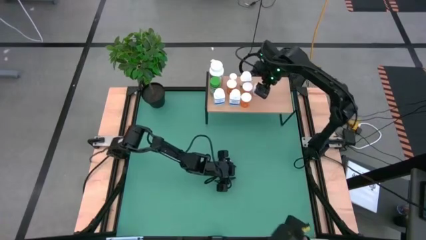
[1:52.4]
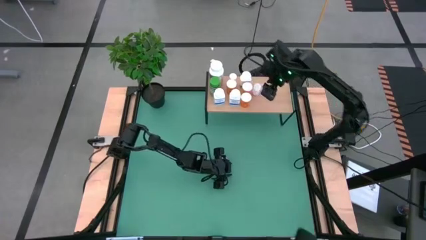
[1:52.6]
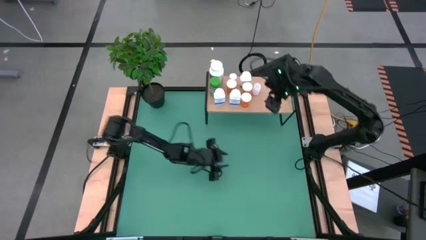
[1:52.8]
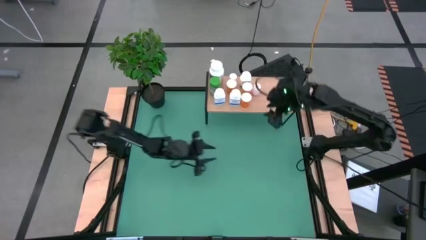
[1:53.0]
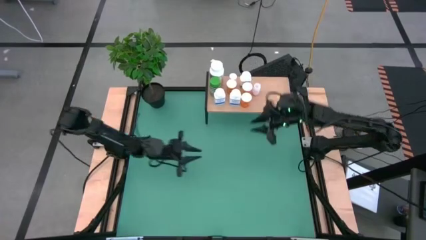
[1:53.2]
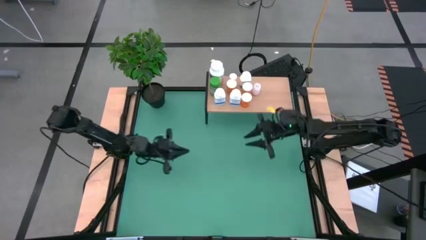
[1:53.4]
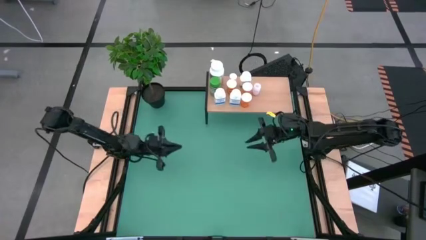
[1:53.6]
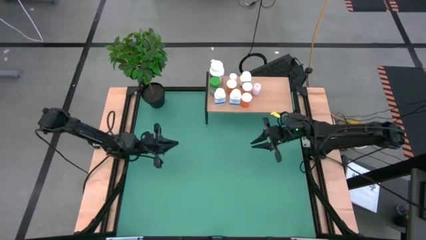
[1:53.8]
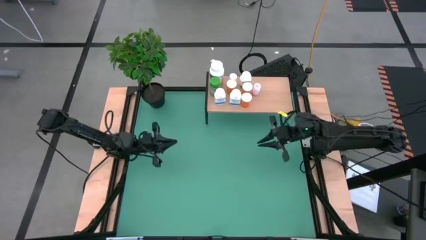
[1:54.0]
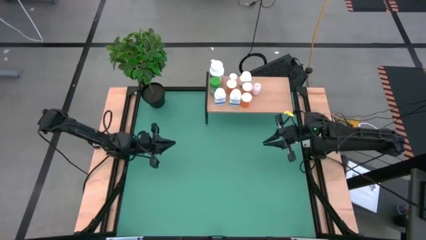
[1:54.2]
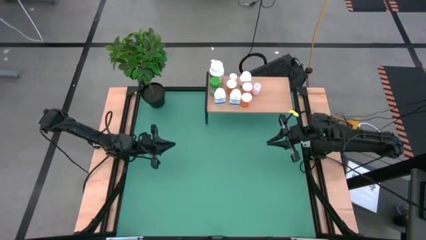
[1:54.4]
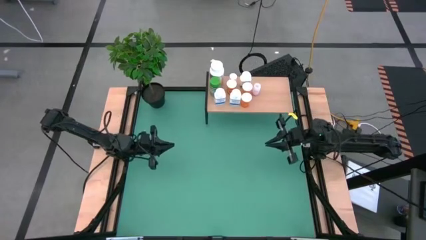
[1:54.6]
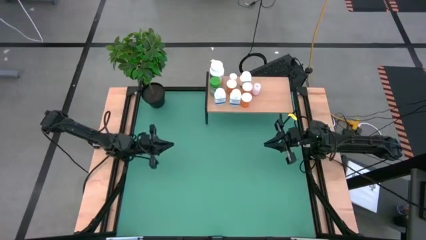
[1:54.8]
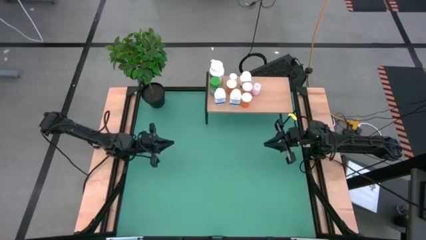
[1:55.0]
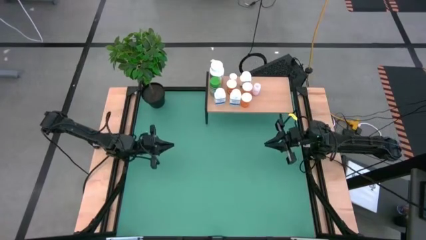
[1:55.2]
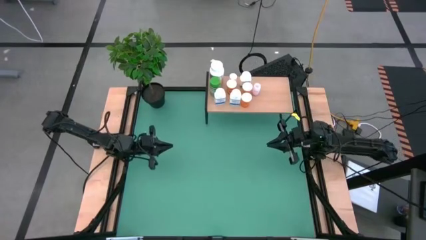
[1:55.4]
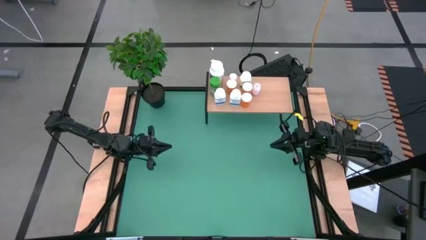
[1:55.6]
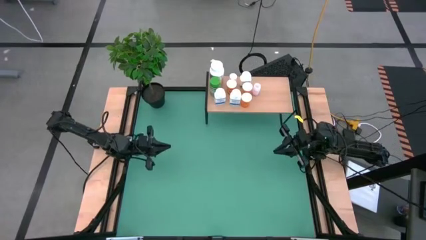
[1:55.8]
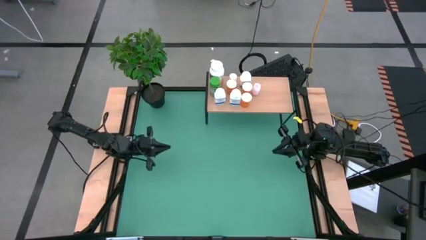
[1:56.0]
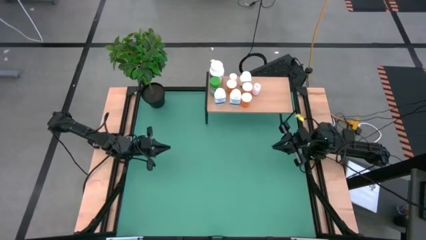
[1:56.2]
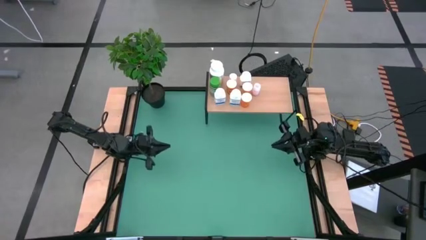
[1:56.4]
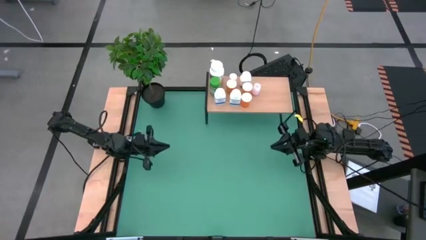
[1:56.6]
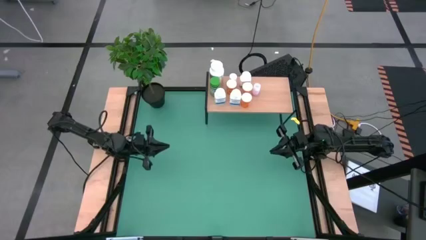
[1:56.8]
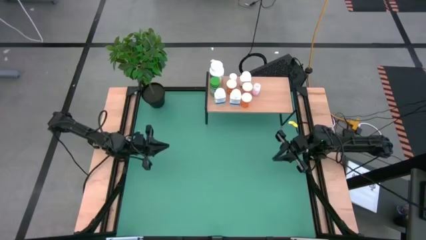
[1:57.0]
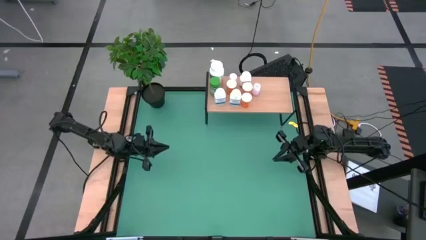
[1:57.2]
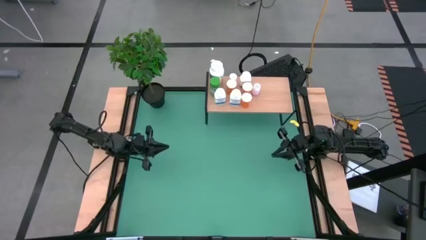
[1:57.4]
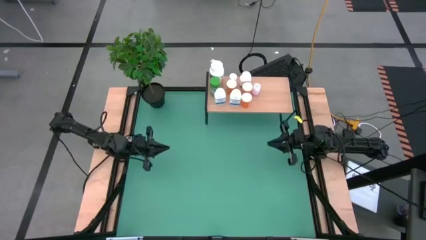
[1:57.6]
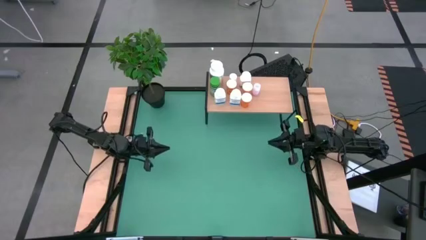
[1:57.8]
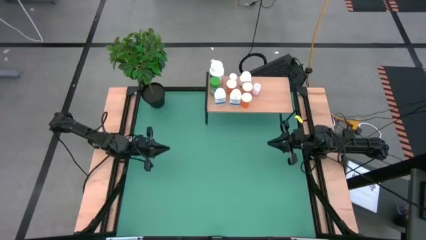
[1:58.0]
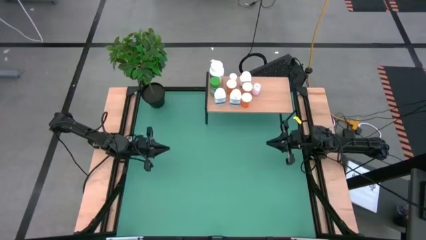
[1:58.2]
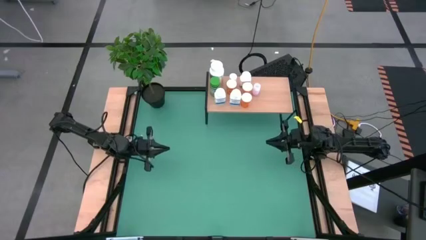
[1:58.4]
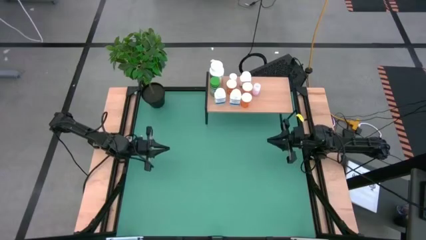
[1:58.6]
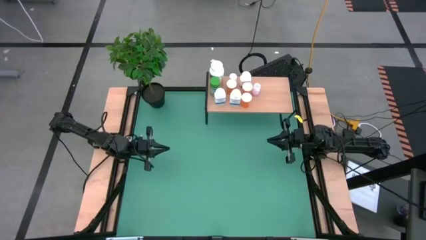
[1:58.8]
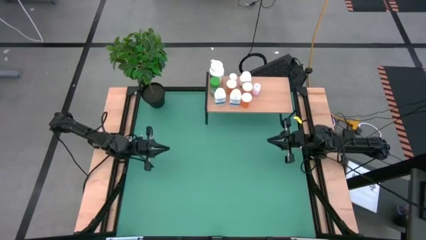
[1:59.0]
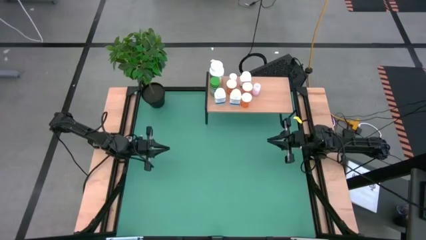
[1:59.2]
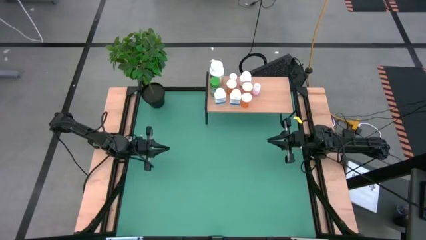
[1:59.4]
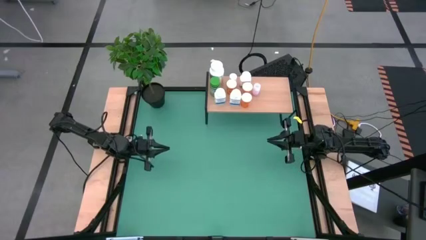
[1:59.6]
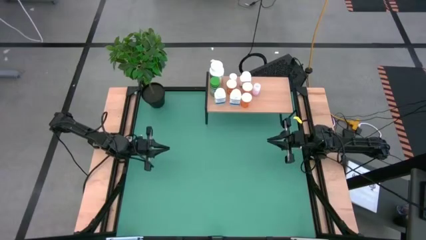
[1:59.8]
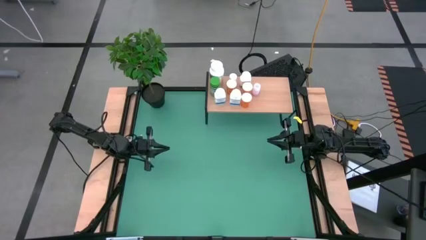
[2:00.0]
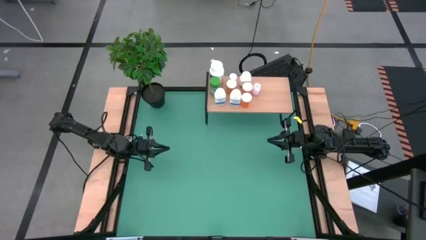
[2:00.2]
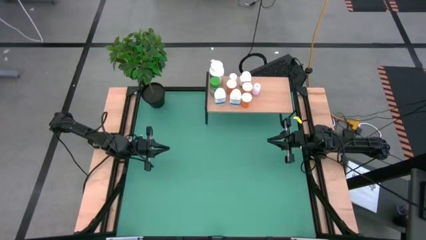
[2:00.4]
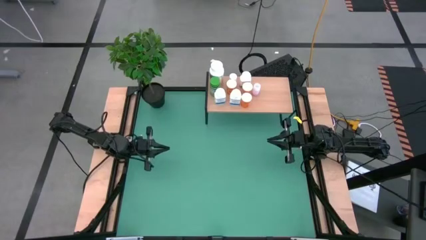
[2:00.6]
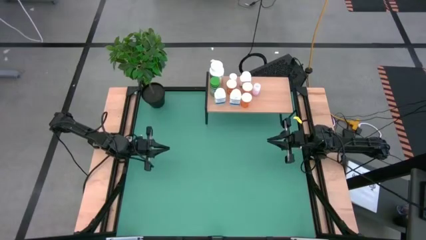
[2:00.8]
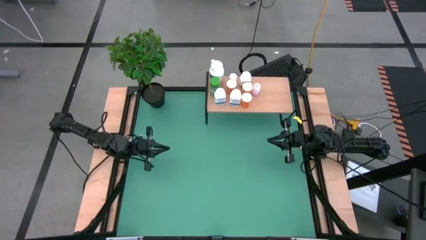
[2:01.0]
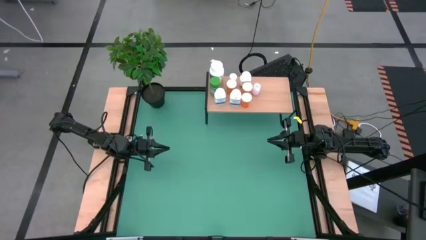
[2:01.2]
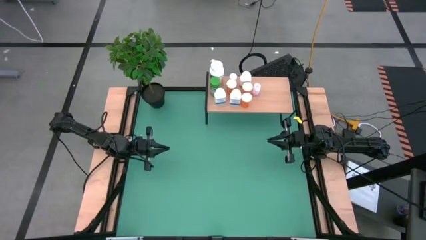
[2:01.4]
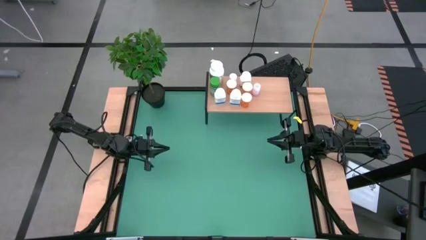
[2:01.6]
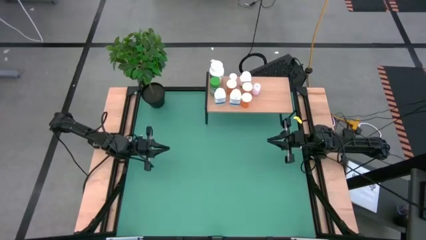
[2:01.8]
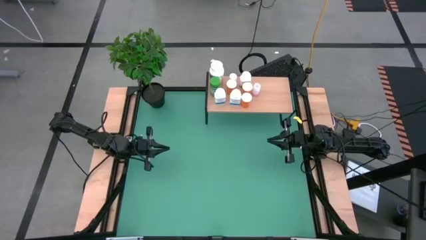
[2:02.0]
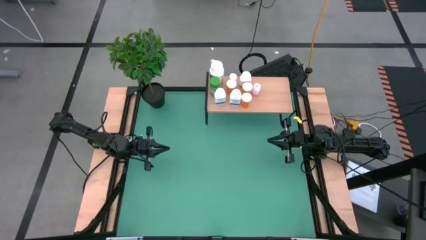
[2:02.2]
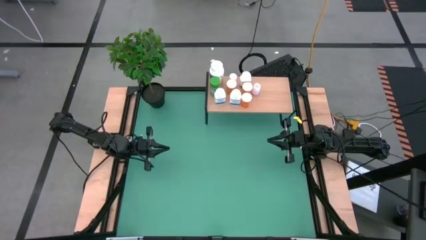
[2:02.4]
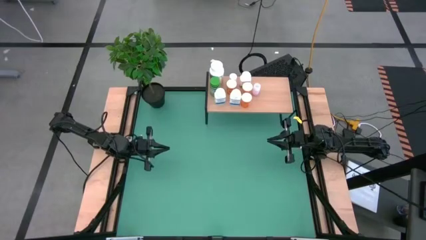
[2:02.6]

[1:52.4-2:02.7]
Task: Pick and place medicine bottles onto shelf by color
Return to Home Position

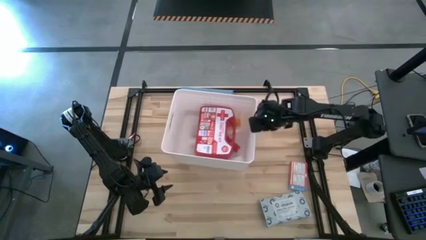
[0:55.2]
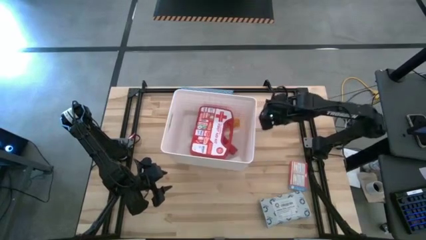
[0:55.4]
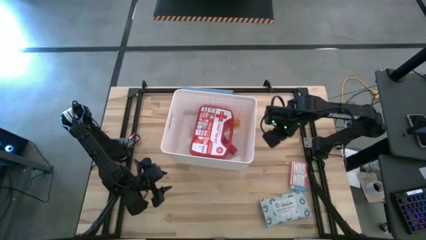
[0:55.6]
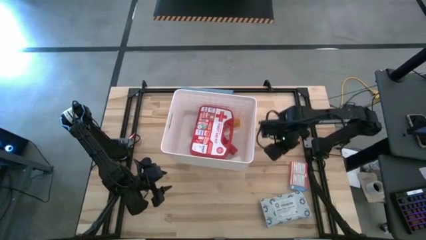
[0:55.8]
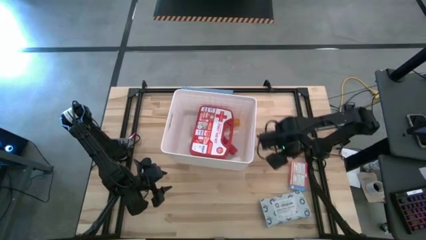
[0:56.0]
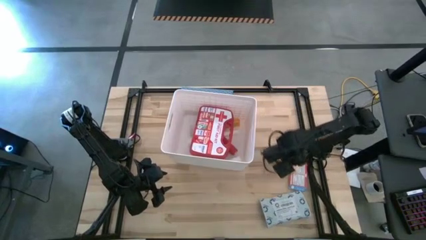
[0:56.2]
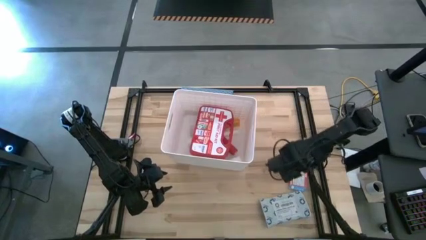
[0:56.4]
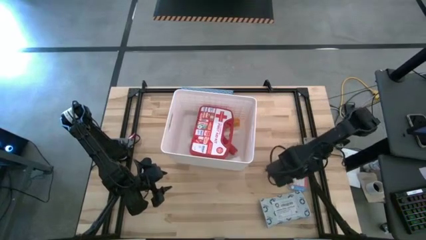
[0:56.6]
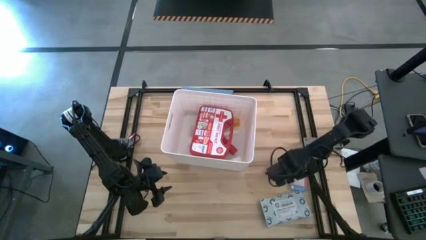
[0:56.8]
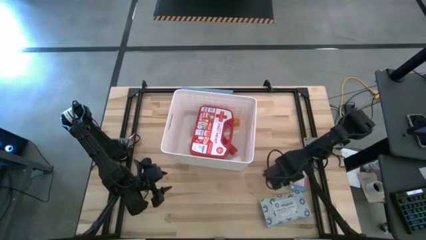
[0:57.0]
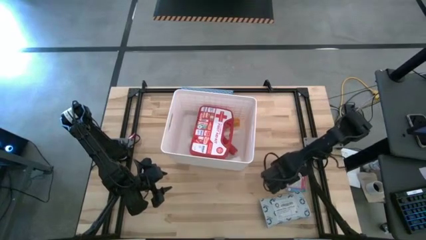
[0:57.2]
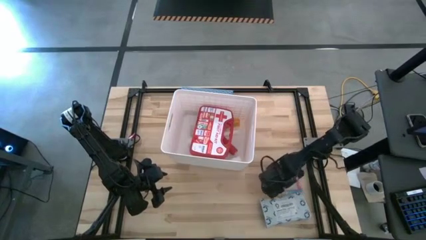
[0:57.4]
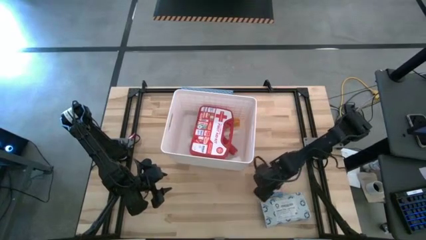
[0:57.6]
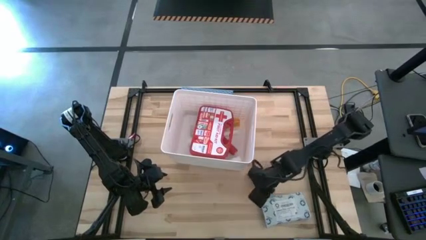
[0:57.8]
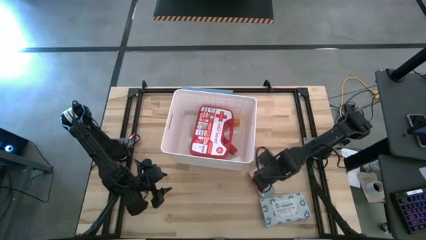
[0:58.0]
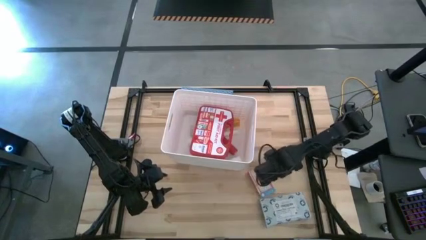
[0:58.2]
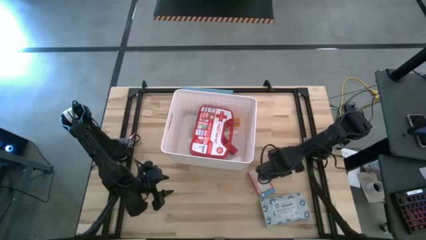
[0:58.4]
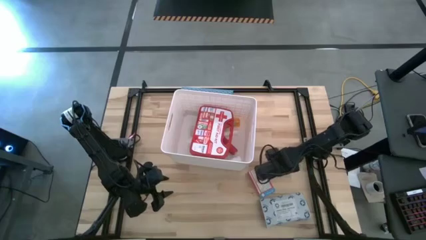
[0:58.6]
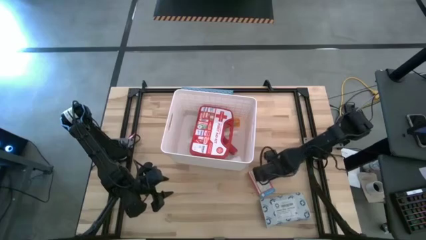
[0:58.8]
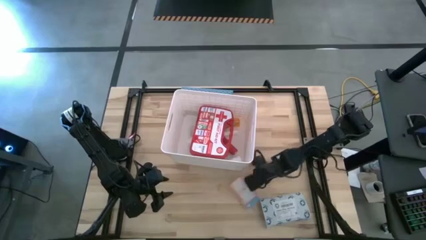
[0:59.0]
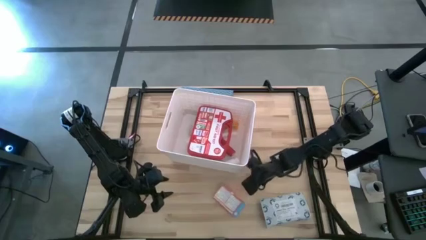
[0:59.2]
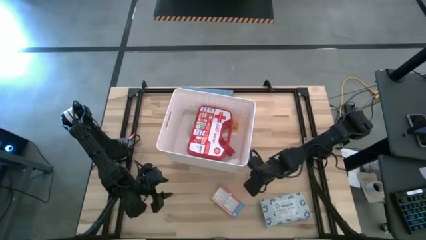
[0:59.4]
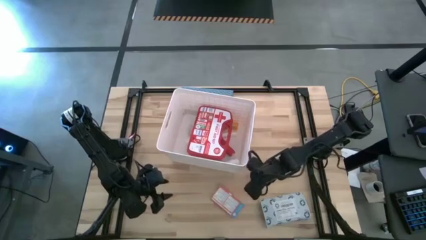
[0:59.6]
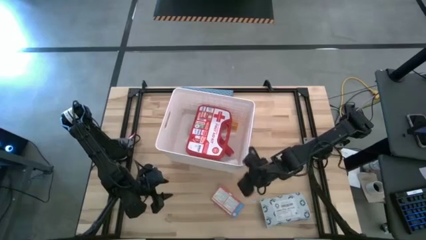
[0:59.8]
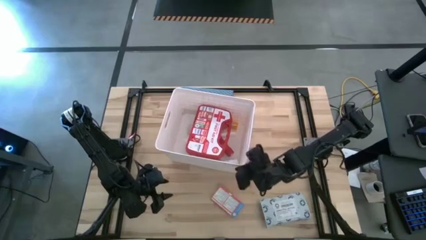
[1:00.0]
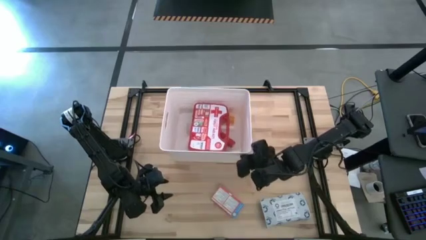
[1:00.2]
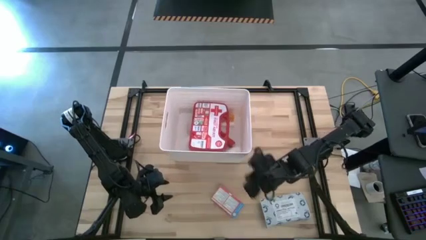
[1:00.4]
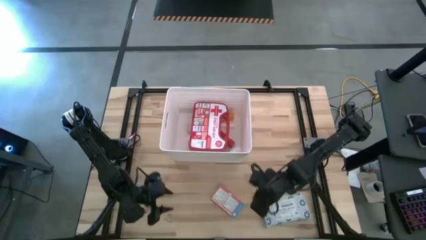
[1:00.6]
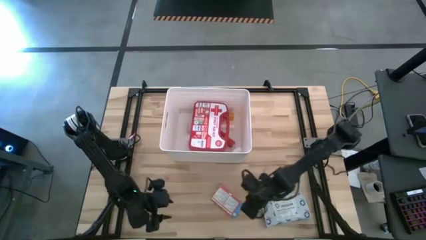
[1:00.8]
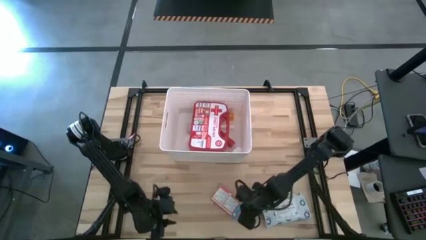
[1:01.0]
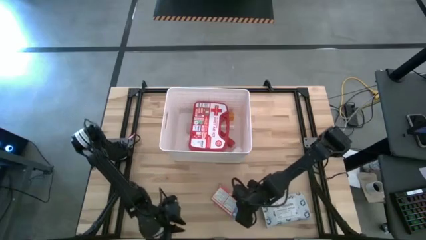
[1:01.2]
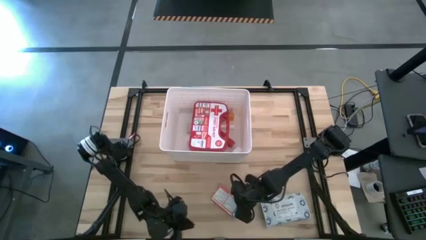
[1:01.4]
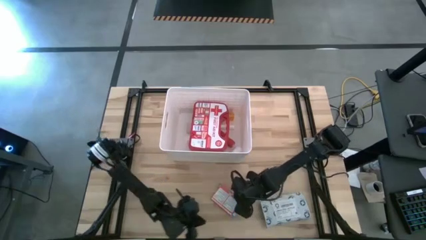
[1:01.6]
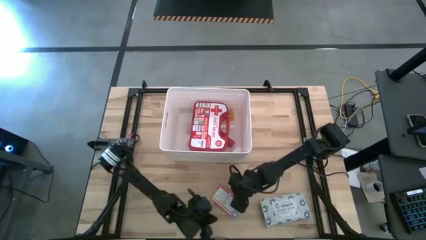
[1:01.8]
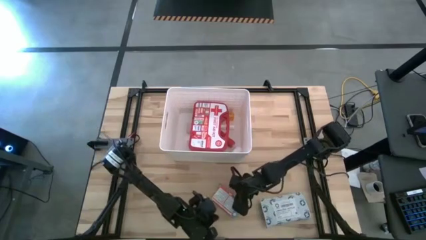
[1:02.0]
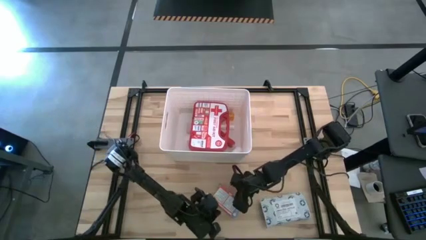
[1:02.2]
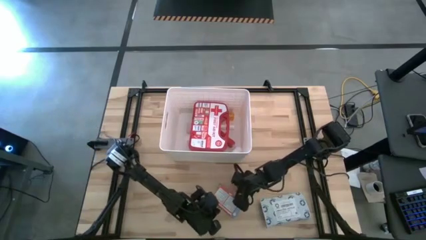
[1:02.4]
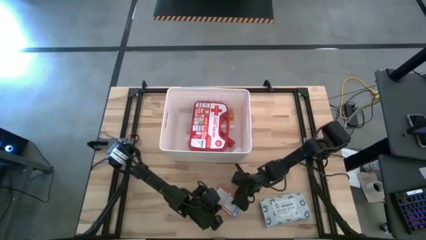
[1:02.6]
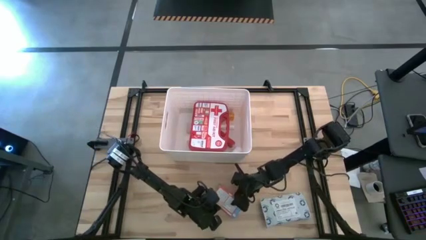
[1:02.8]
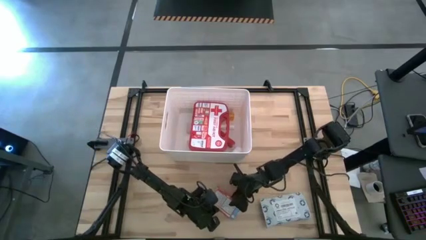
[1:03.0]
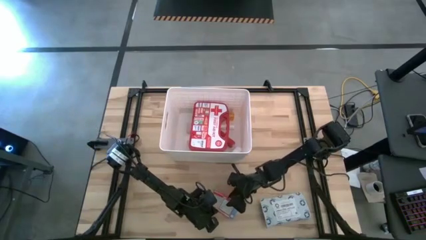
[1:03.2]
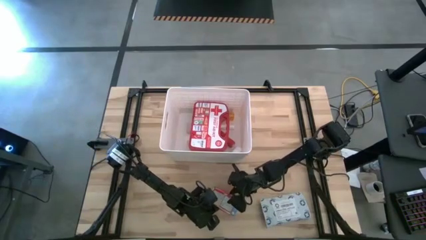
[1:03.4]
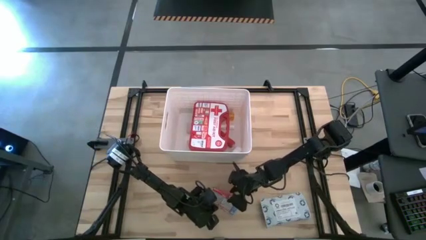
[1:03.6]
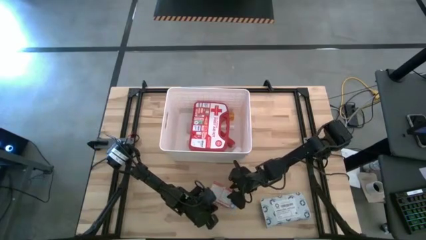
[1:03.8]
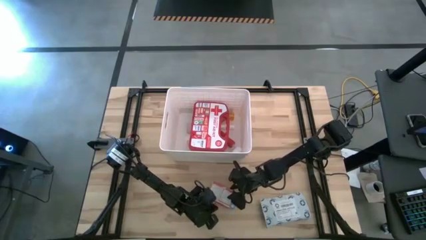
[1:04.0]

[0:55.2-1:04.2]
Task: Pick & place medical supplies in basket/bin
Put the red medicine box into the white basket
